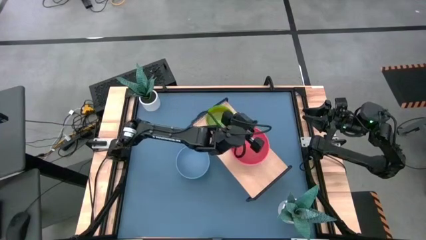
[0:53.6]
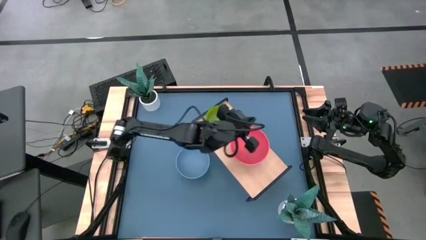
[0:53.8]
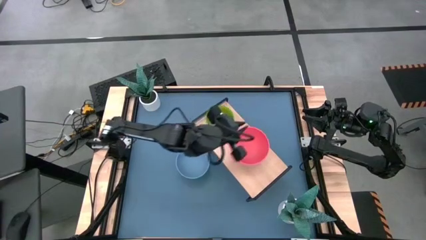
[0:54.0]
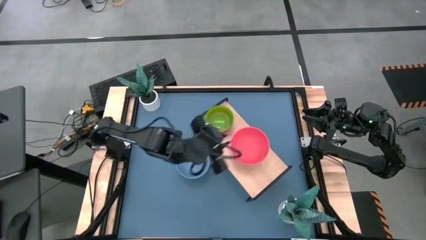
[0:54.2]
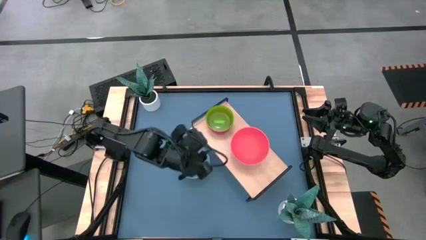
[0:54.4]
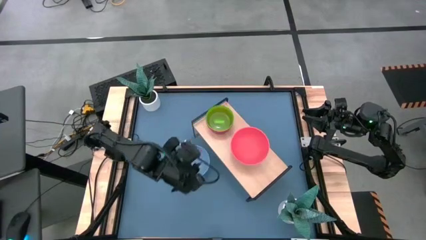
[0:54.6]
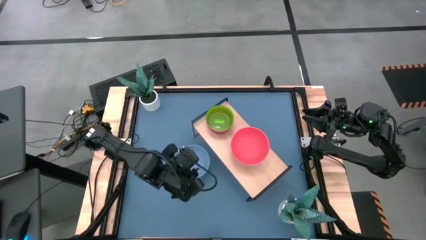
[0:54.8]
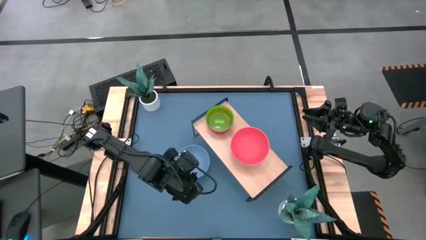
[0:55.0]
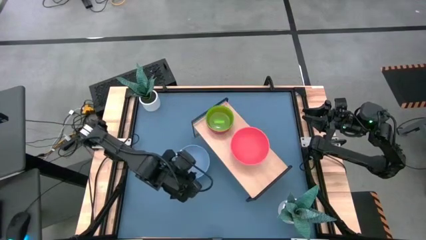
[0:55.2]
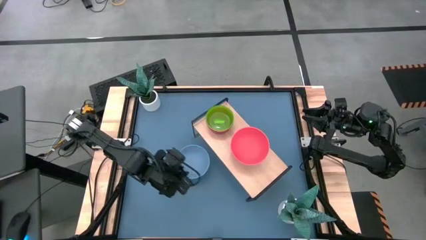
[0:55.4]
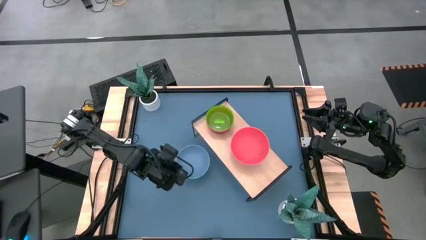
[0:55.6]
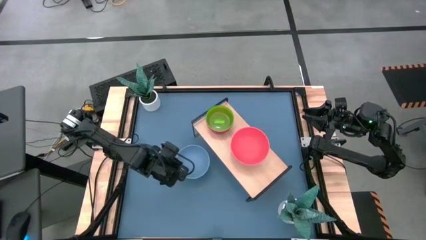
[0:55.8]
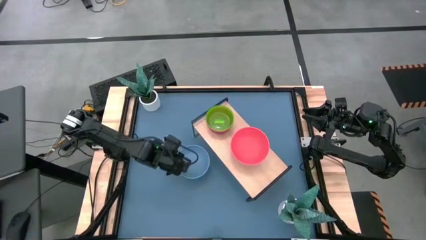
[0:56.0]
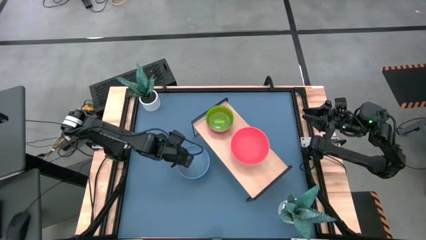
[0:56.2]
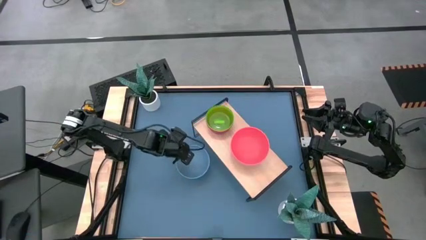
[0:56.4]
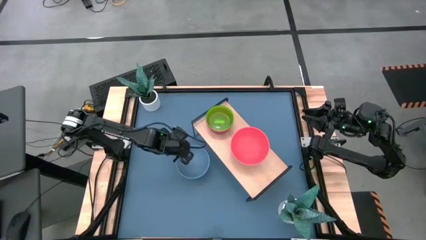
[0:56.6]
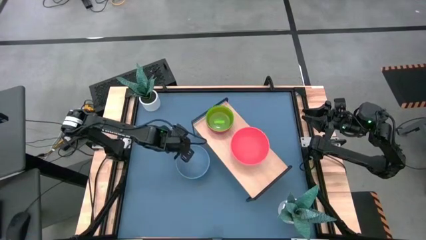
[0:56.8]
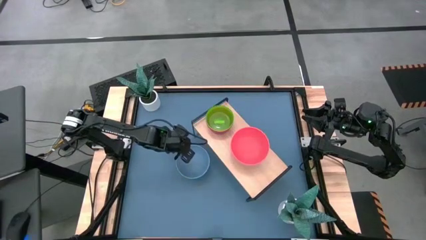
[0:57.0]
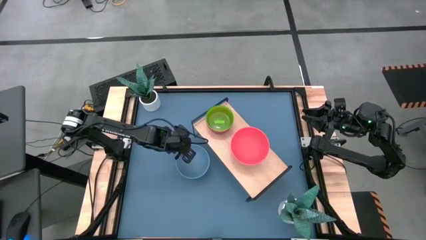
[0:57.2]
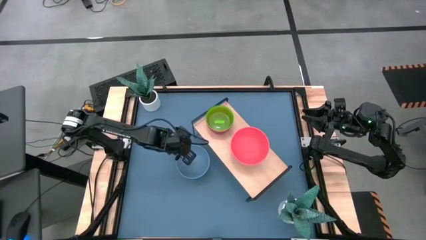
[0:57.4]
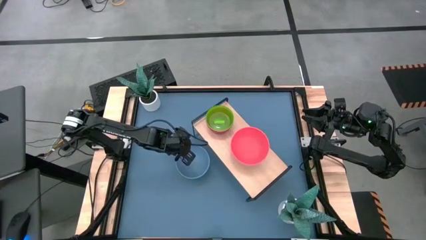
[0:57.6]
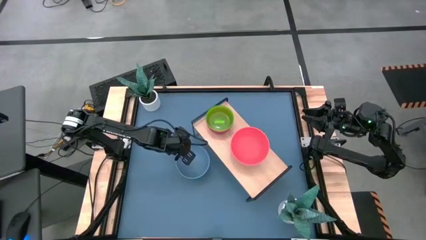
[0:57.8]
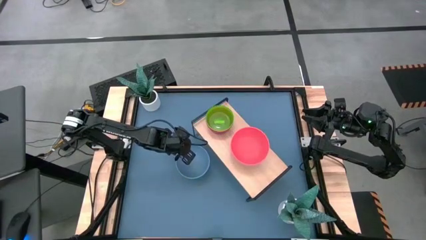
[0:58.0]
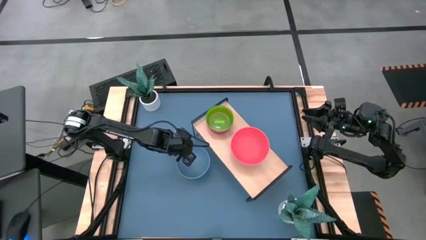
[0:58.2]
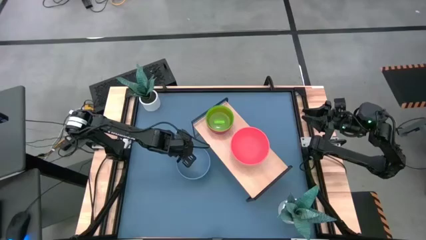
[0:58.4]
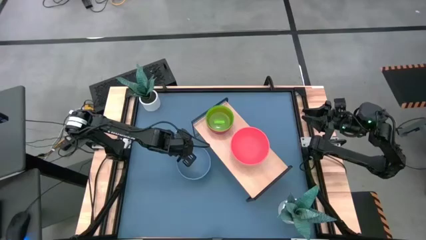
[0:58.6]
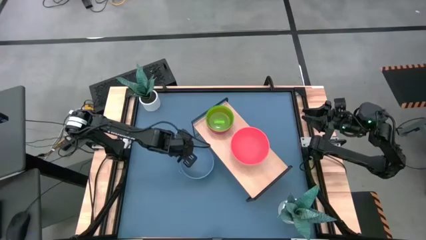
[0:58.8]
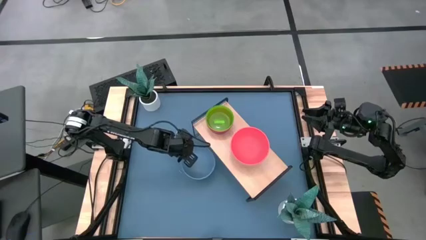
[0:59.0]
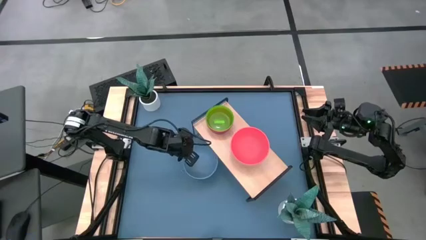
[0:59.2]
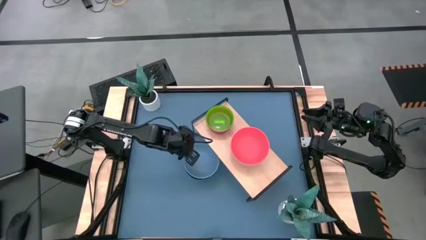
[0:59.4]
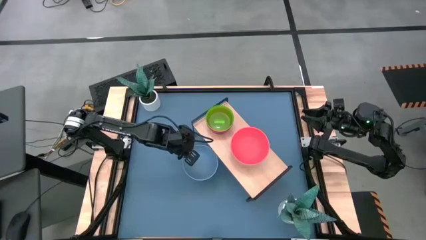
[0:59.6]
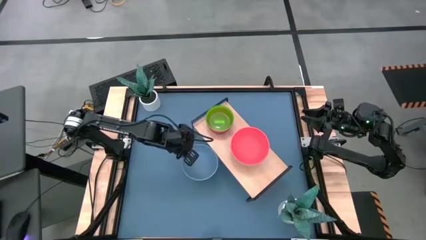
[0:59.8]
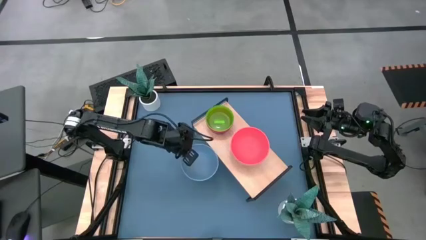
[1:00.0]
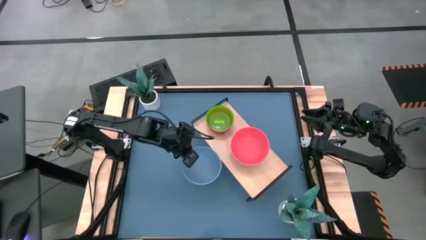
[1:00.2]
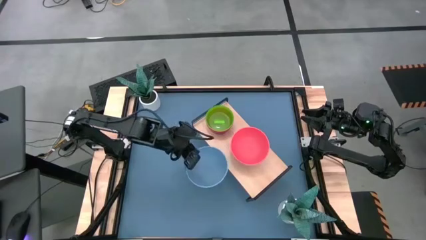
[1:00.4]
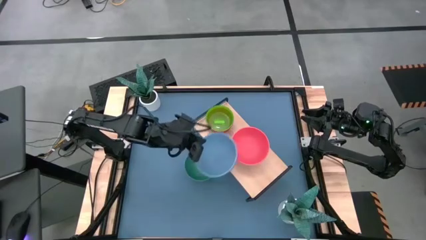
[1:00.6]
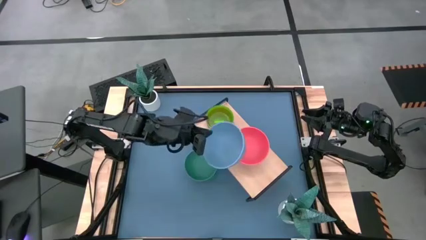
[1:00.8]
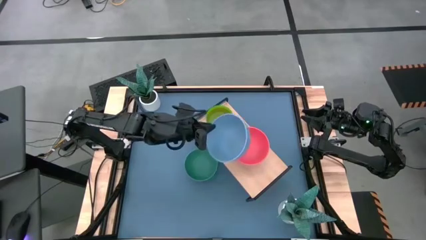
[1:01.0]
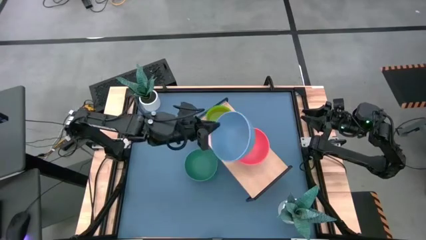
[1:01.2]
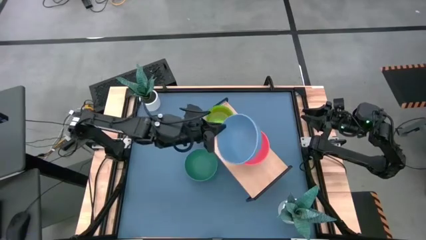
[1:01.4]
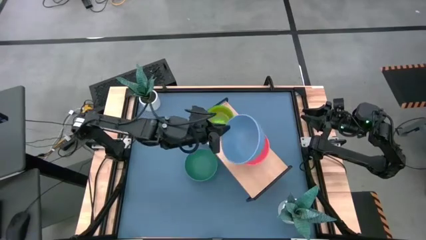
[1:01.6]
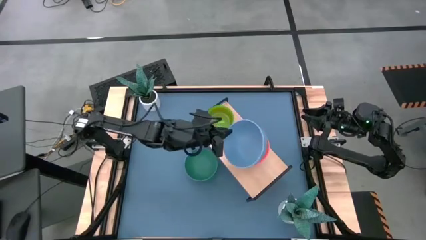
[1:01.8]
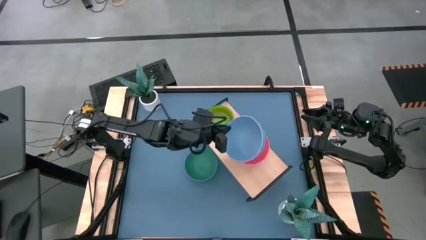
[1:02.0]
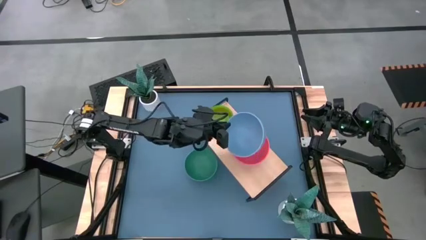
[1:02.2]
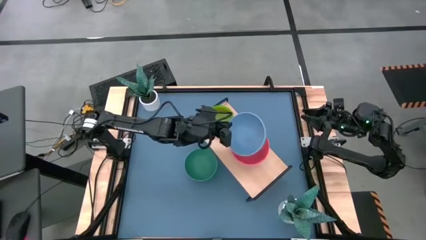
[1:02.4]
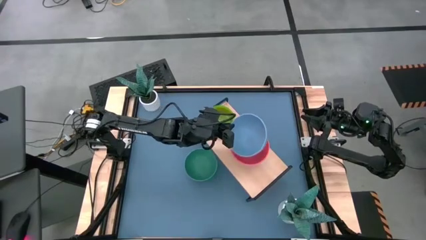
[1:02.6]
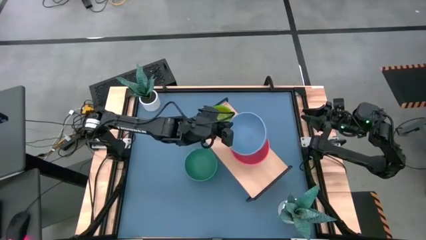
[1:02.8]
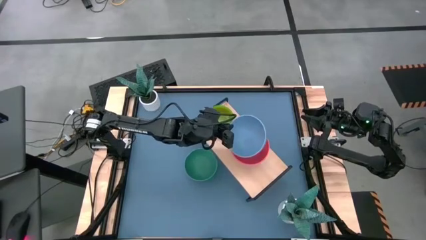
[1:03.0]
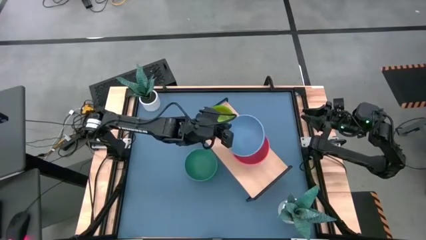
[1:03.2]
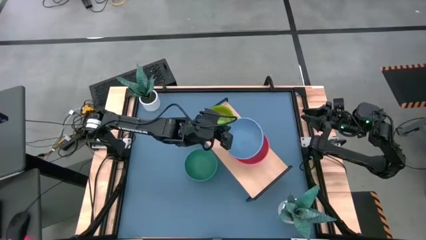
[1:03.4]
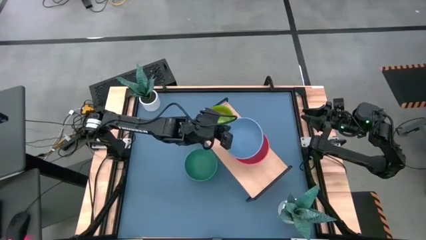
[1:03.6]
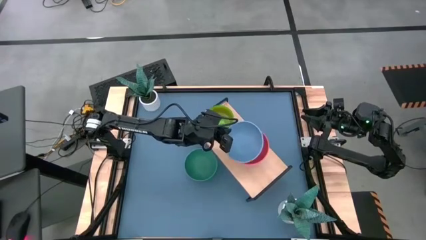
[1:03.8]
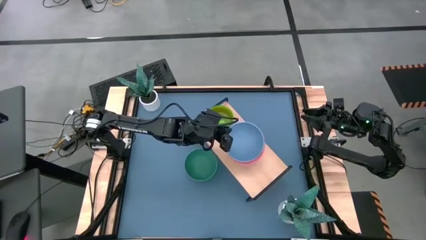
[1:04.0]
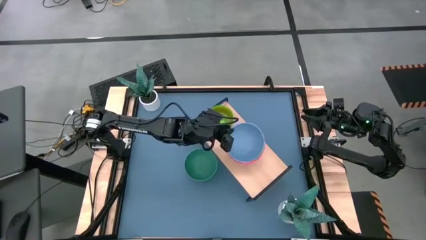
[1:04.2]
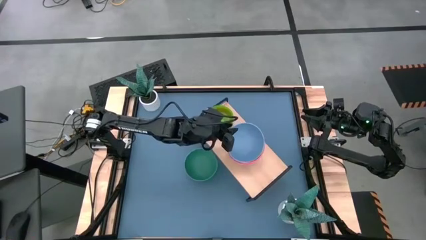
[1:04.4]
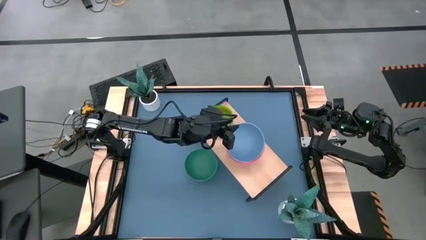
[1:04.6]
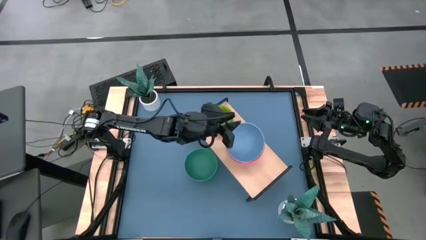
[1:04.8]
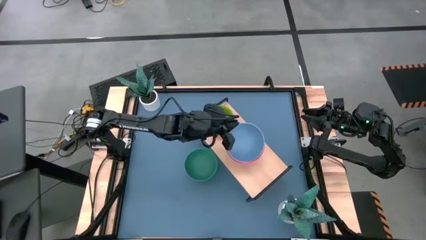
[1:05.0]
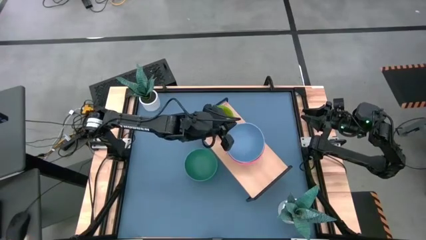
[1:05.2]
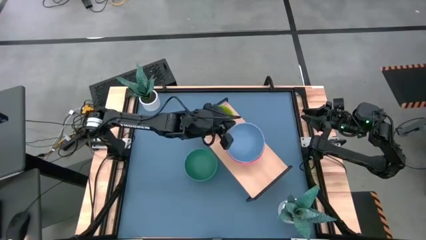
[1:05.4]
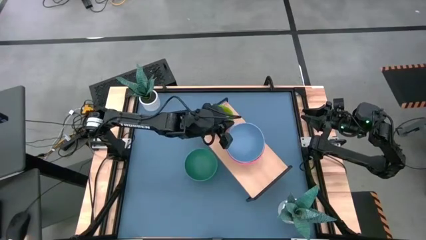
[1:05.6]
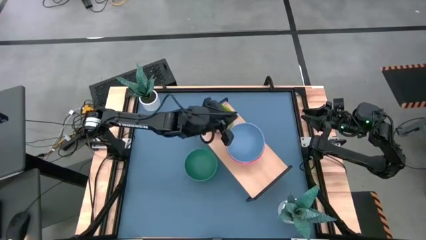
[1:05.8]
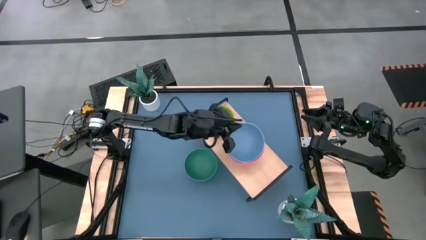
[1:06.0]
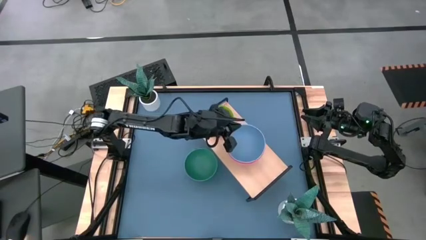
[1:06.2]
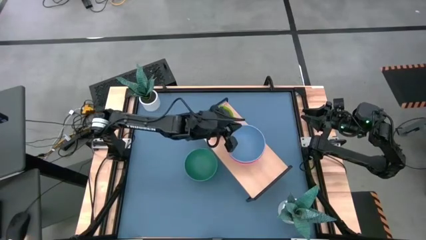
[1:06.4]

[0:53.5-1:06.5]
Task: Place and stack bowls onto a shelf
Stack the light blue bowl on top of the orange bowl on the shelf

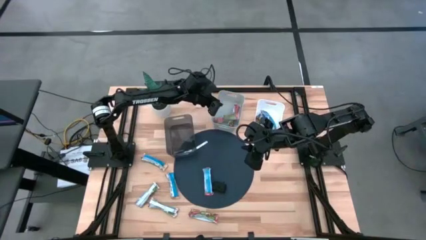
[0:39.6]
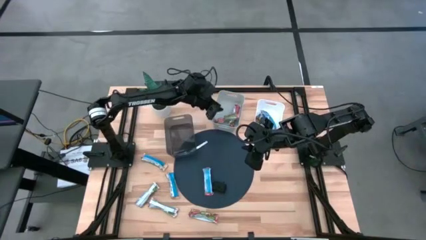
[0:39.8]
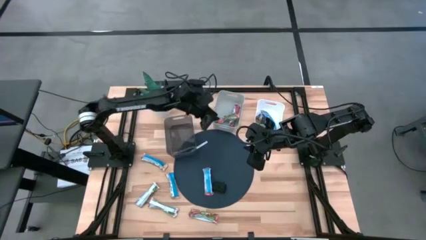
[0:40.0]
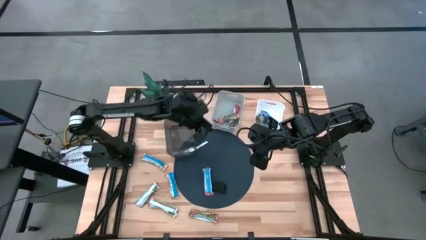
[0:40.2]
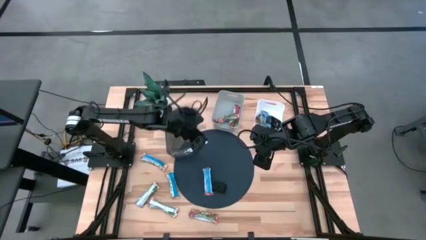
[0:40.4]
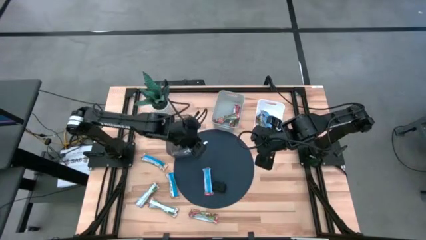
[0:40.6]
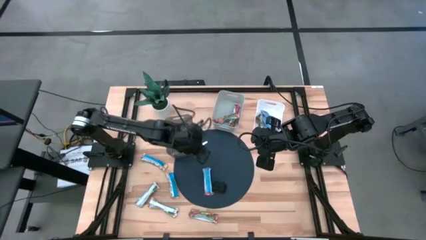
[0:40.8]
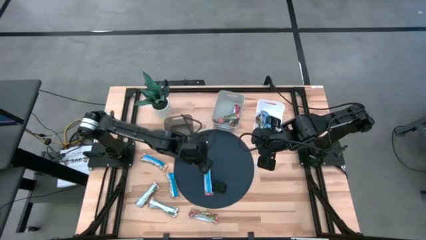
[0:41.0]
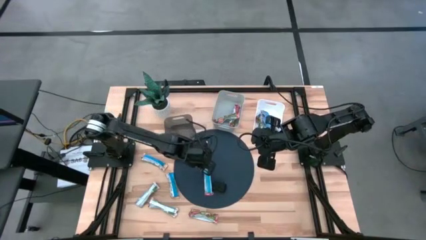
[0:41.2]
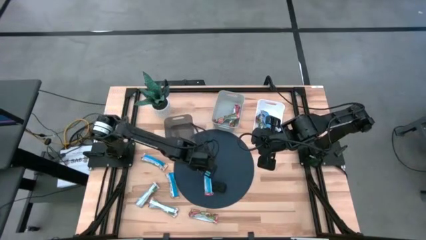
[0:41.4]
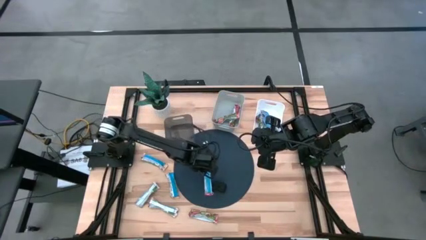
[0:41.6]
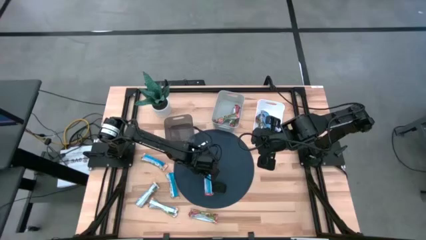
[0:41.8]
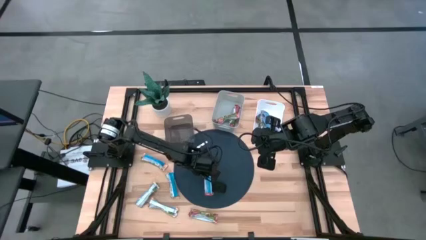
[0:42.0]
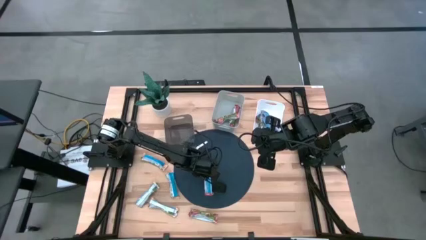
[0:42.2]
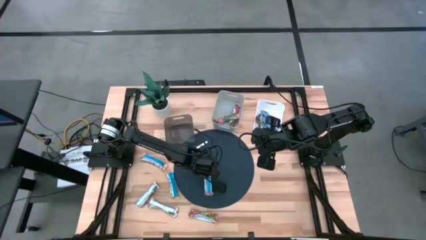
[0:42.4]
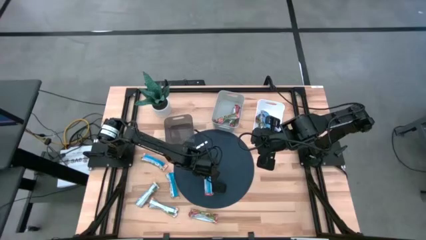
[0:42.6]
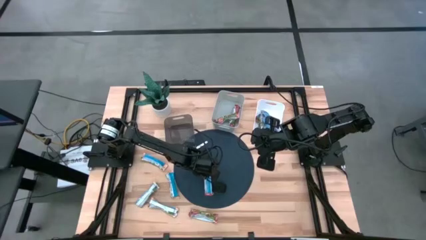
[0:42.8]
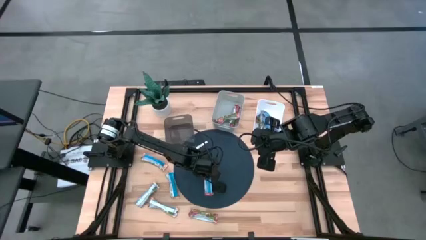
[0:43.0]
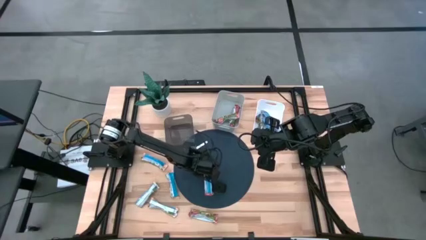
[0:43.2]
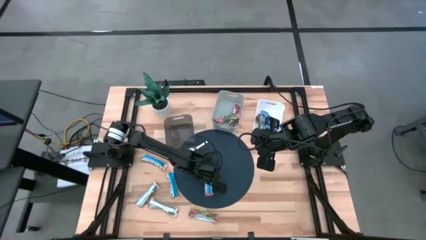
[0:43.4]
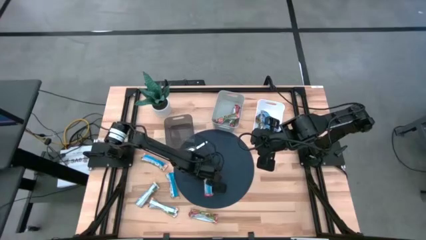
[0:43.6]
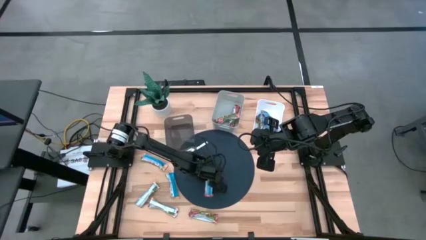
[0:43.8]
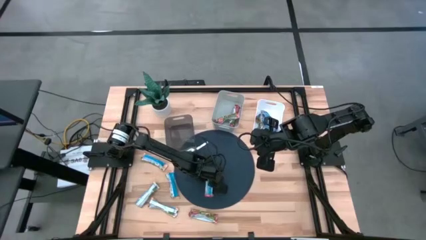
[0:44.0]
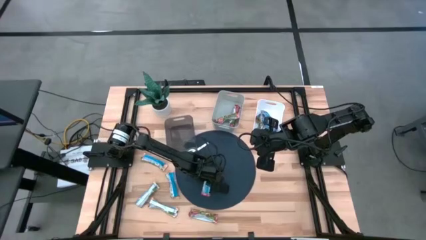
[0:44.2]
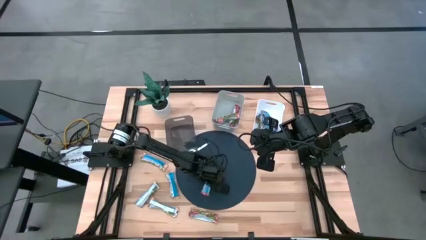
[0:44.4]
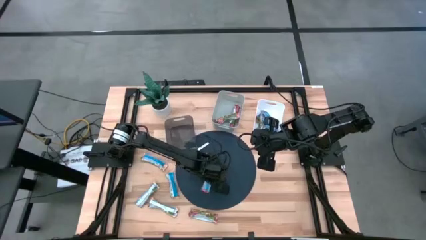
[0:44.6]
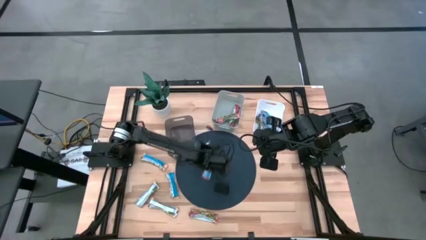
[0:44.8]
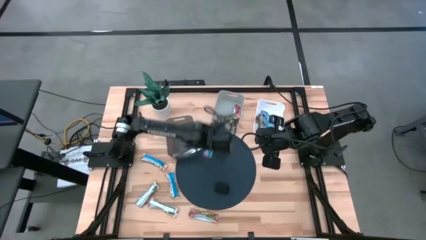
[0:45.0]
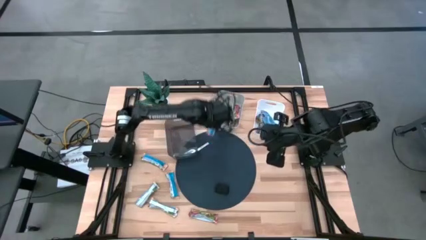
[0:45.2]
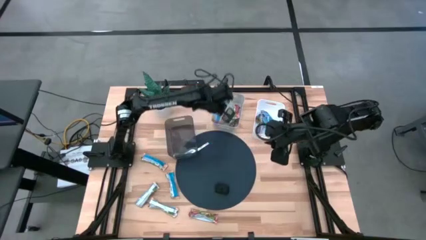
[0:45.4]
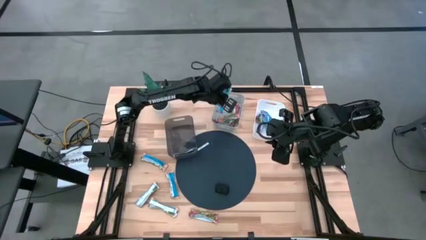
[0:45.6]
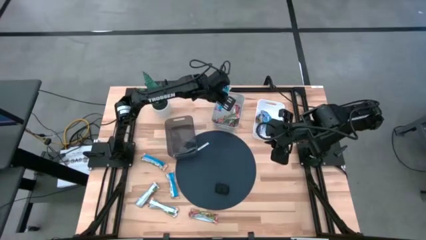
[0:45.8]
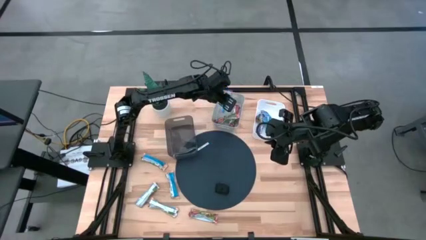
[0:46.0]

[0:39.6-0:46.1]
Task: Pick and place Granola Bars by type
Put the top red granola bar into the gray bin
